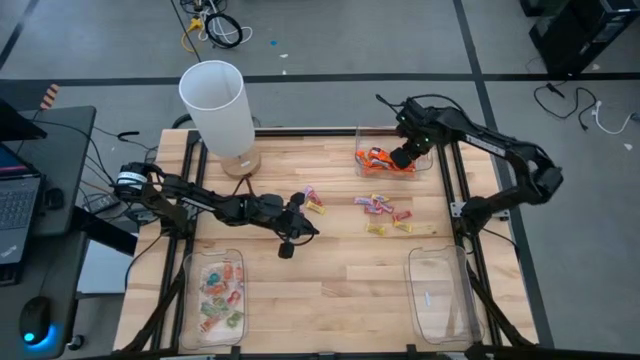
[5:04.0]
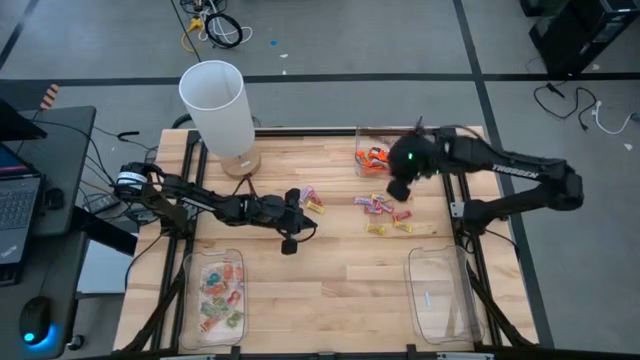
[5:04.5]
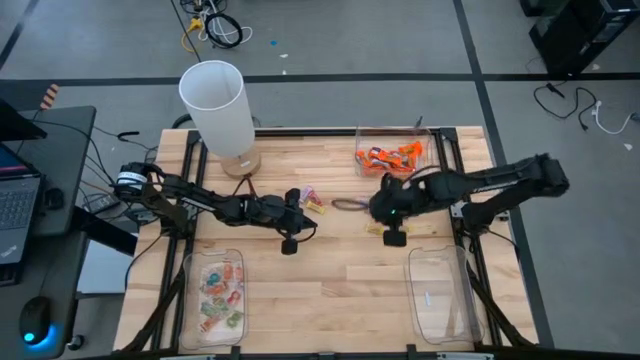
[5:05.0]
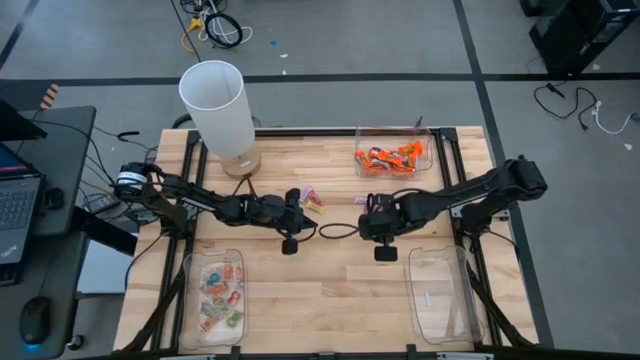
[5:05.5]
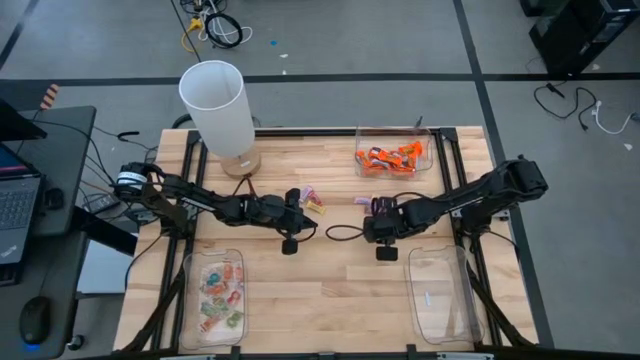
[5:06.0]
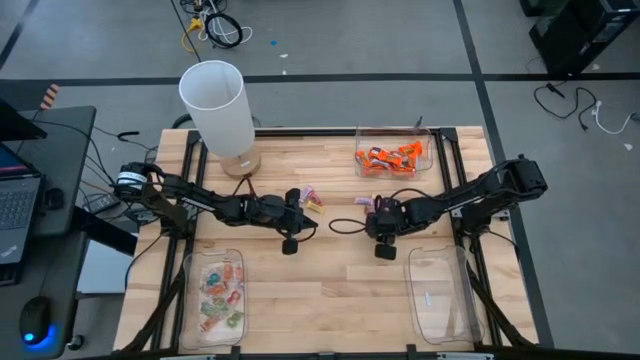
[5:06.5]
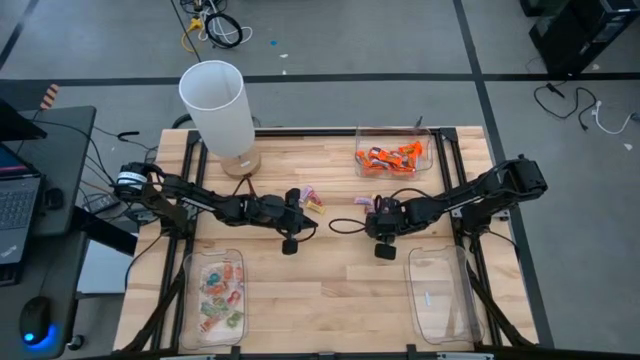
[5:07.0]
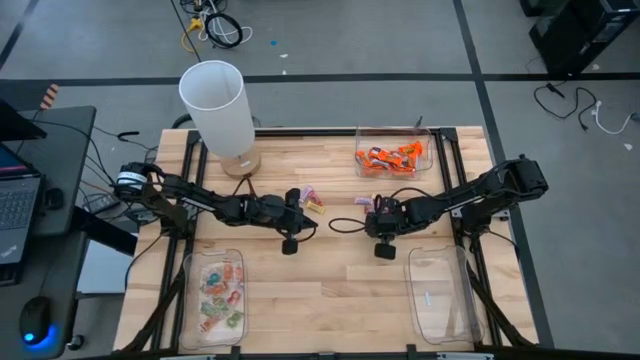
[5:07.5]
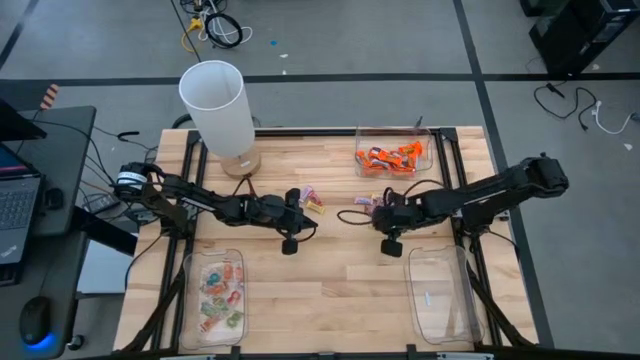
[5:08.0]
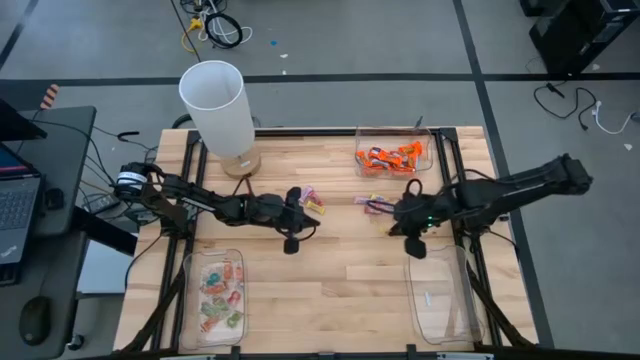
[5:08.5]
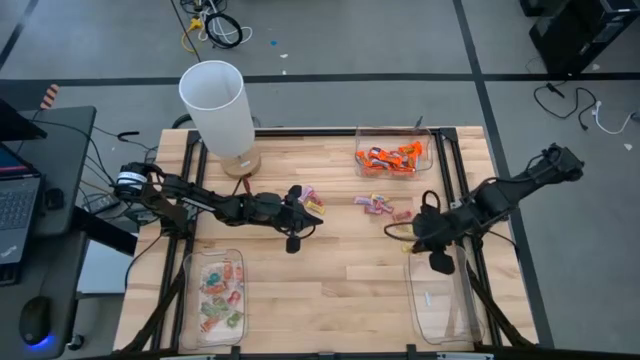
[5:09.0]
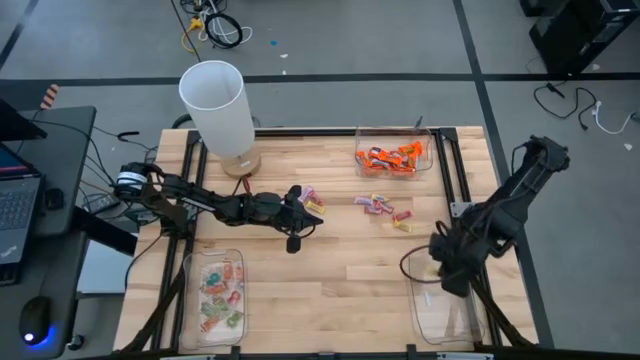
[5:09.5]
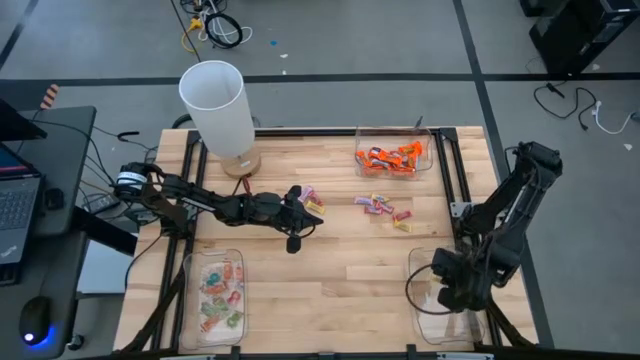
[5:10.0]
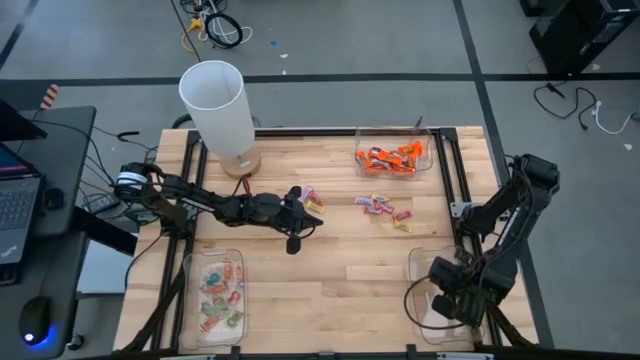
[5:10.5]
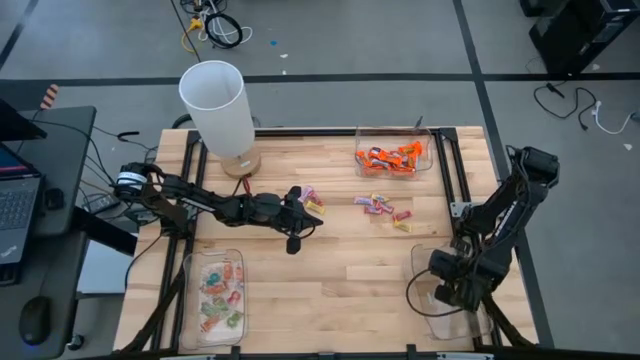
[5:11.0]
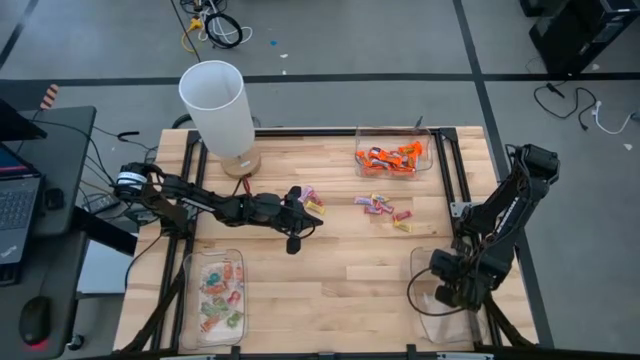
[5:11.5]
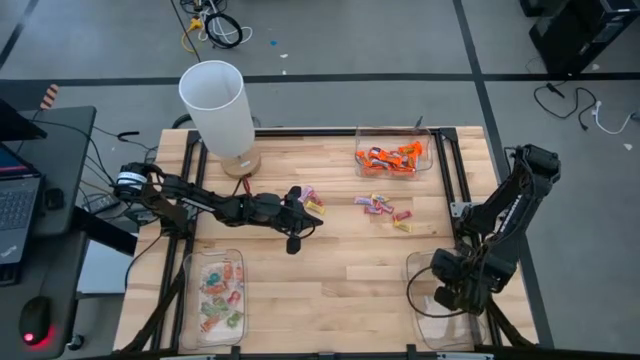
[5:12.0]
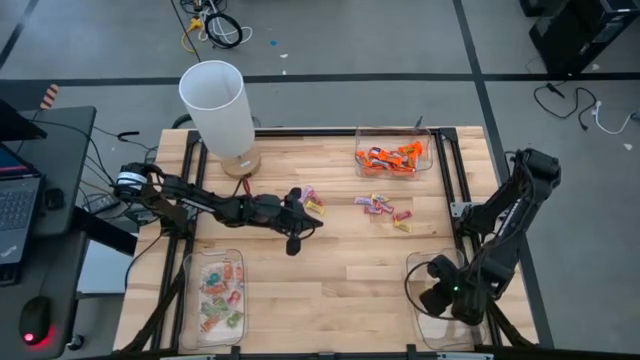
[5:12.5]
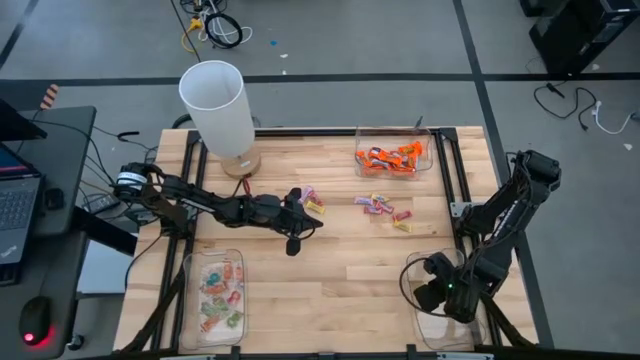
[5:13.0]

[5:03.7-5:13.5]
Task: Sort candy
Put the yellow candy into the bottom right transparent bin

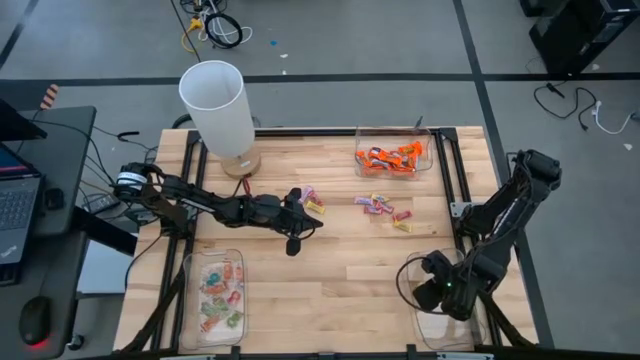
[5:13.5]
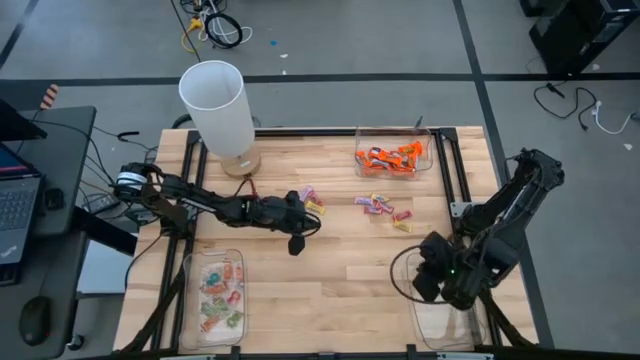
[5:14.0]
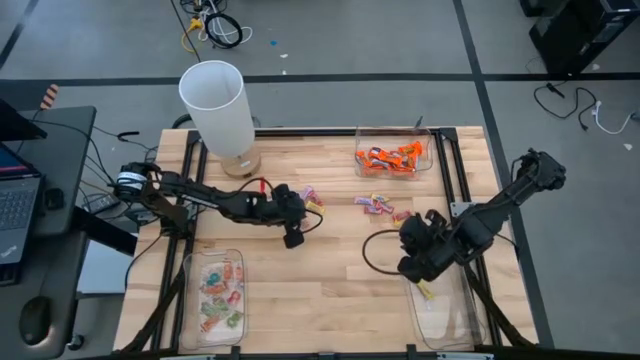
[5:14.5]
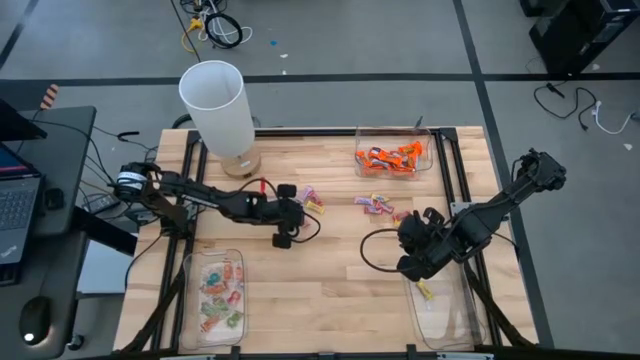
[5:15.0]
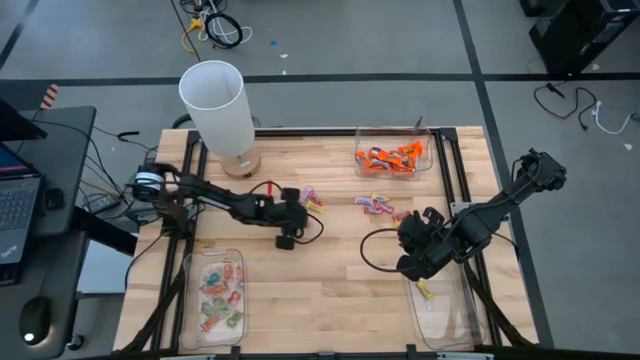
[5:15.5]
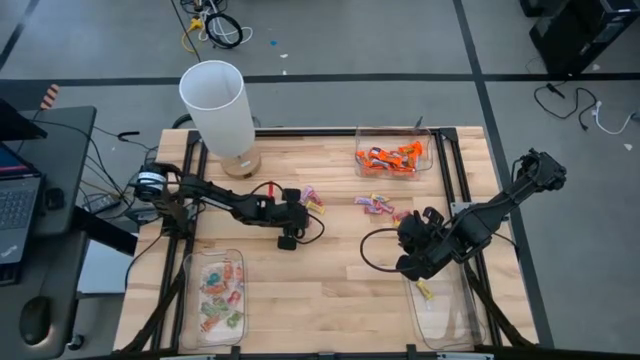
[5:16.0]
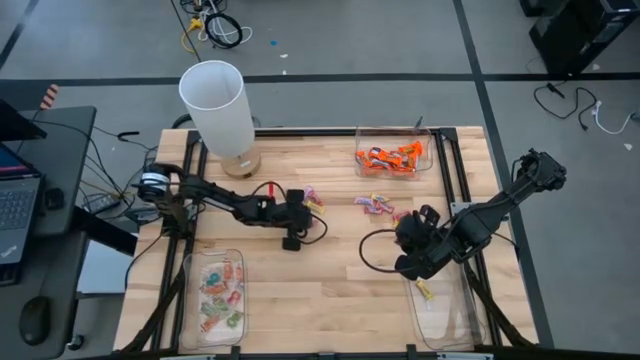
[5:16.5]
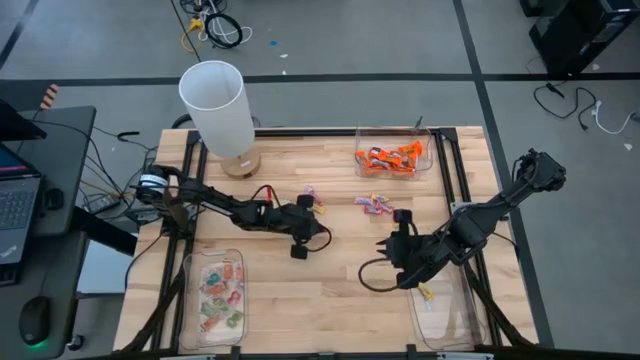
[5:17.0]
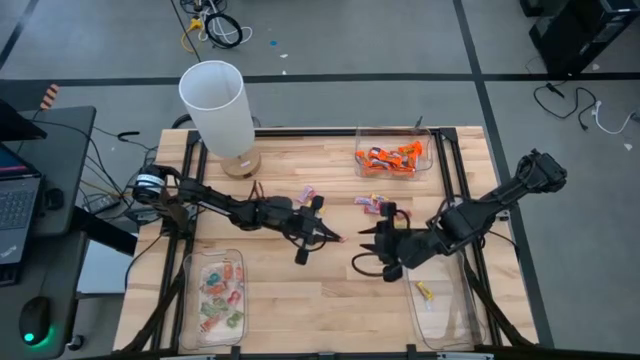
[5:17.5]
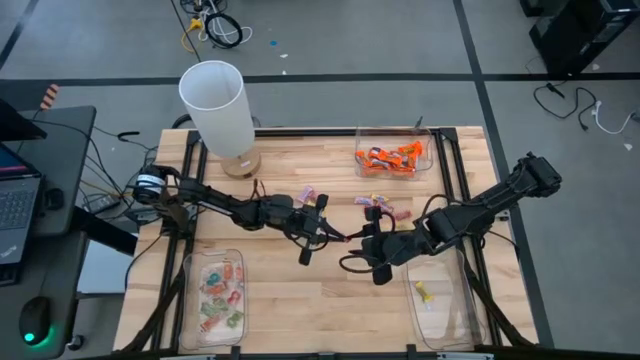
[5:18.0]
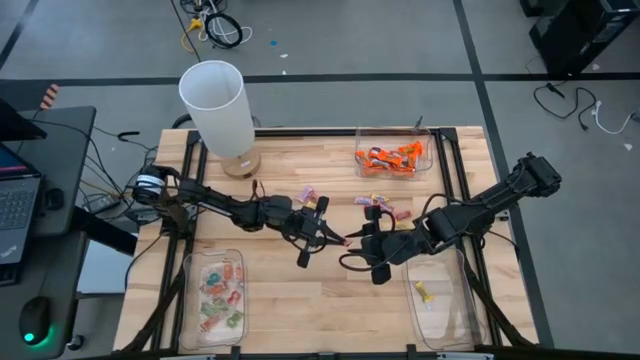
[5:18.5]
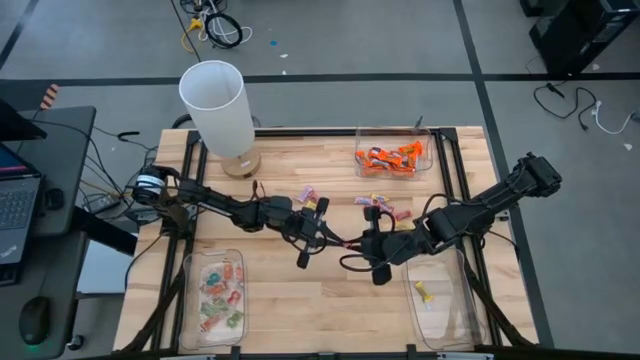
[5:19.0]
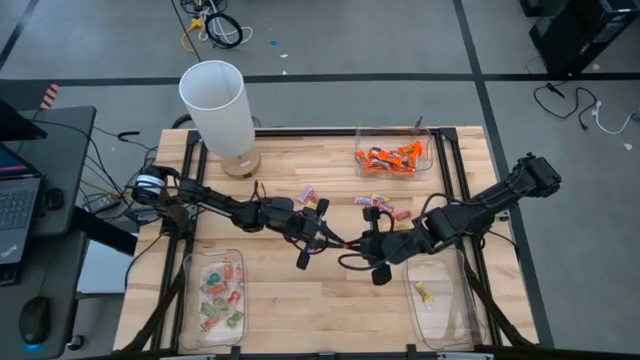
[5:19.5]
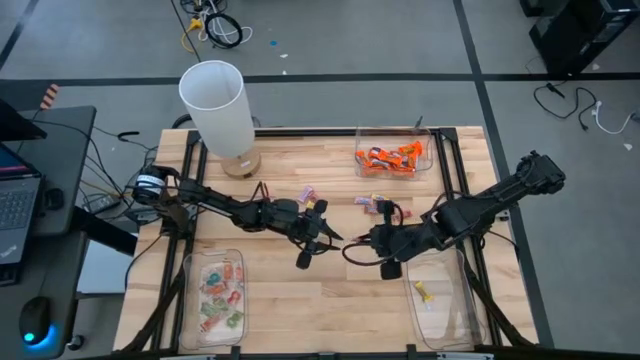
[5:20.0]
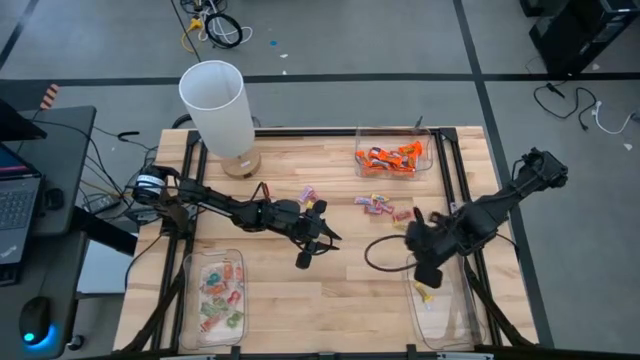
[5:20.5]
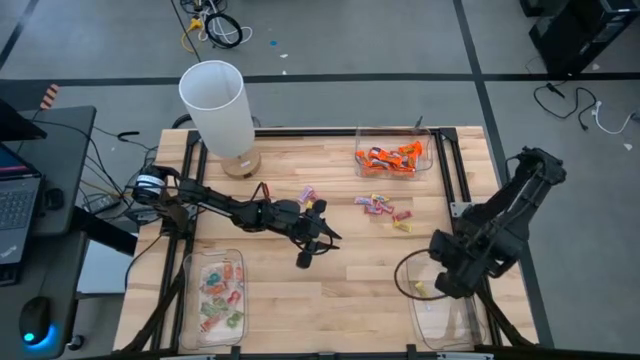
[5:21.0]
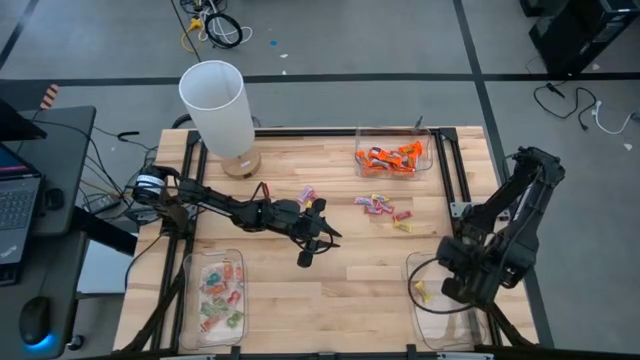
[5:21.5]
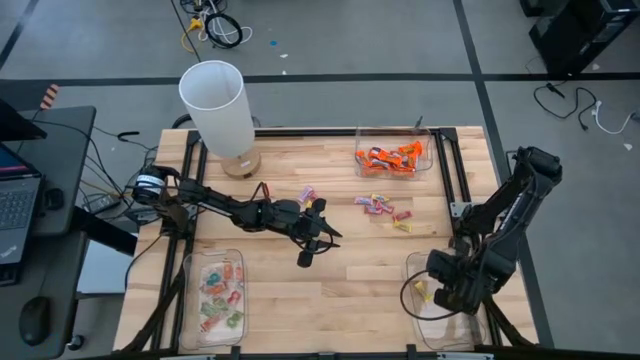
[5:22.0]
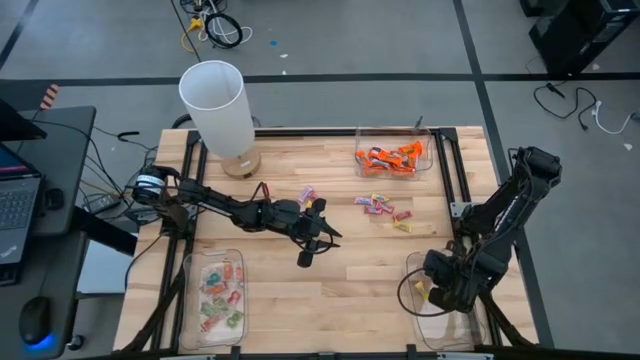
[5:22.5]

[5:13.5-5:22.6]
Put the red candy into the bottom right transparent bin

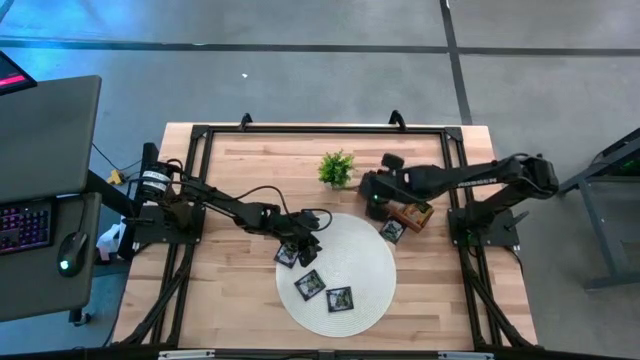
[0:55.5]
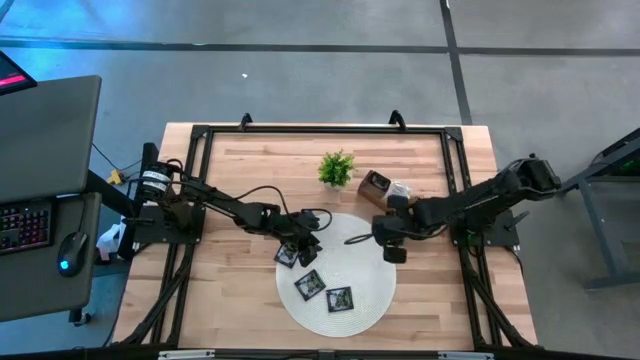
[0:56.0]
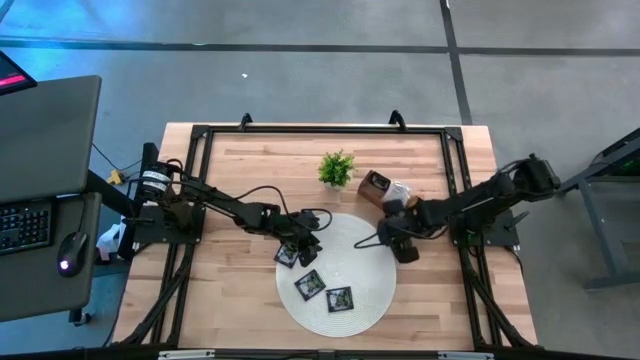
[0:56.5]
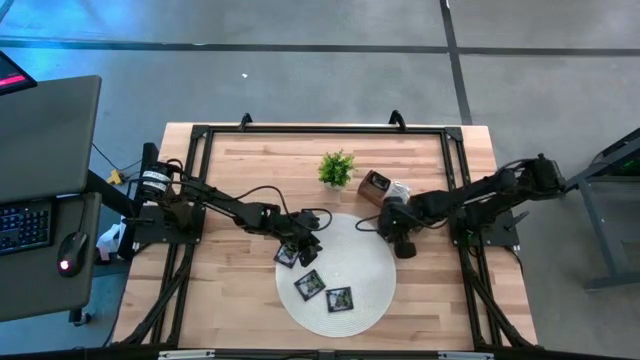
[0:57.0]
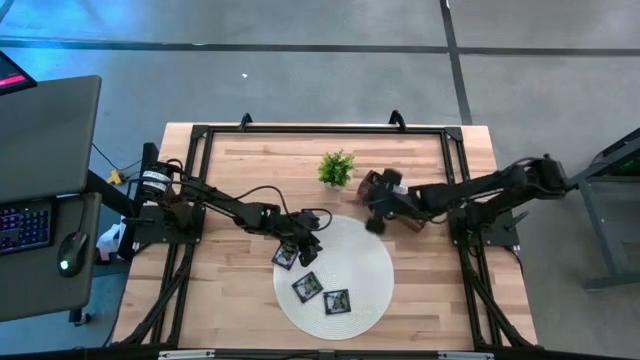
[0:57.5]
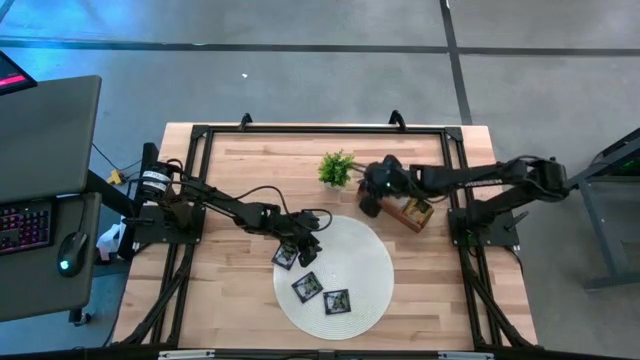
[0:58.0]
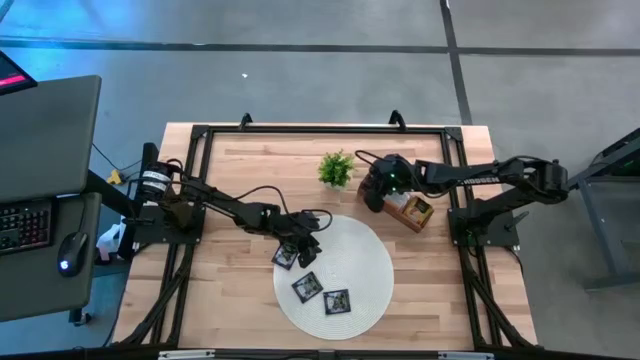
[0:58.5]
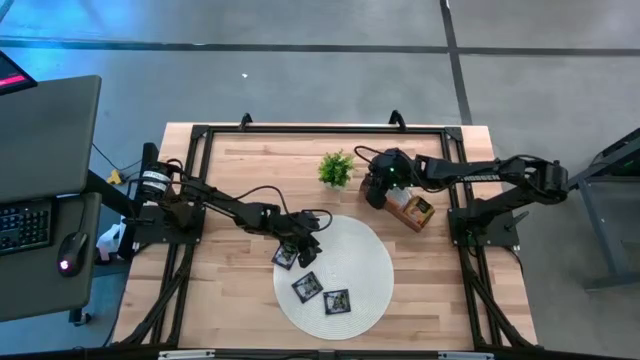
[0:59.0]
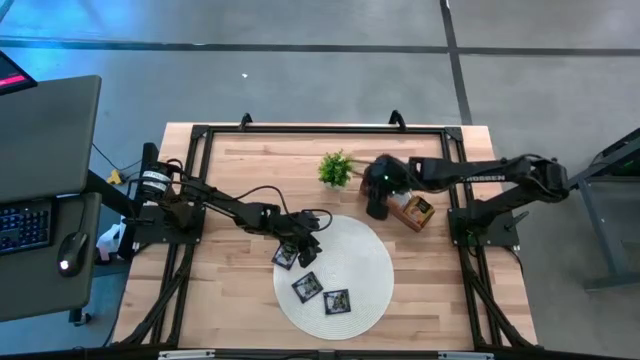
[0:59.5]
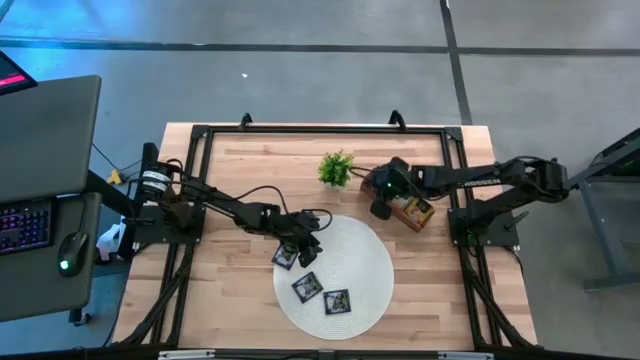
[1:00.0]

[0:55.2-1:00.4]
Task: Pick & Place Tea
Put the black tea bag into the left section of the wooden organizer
